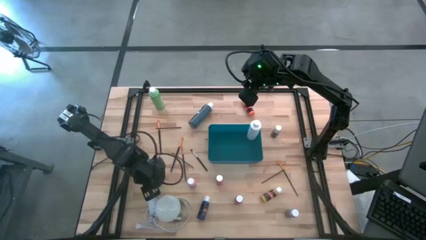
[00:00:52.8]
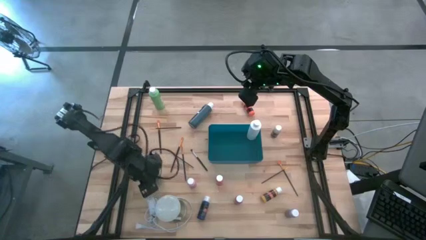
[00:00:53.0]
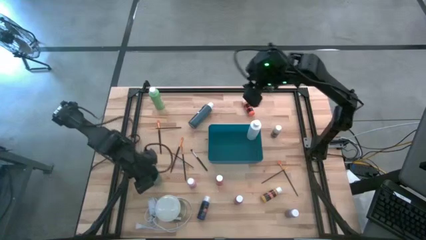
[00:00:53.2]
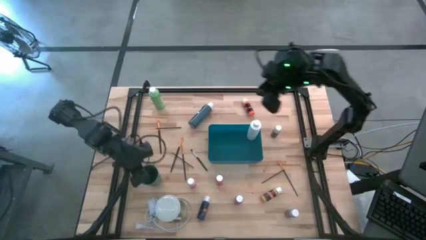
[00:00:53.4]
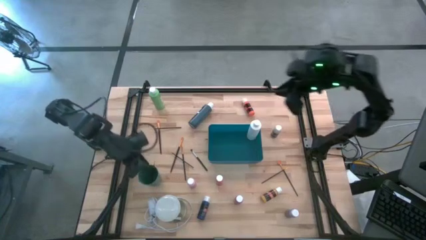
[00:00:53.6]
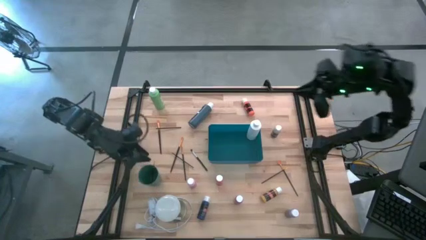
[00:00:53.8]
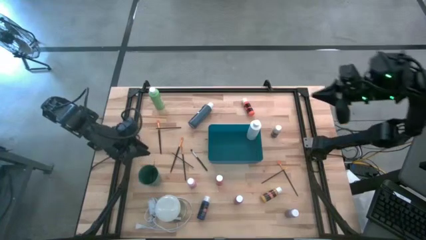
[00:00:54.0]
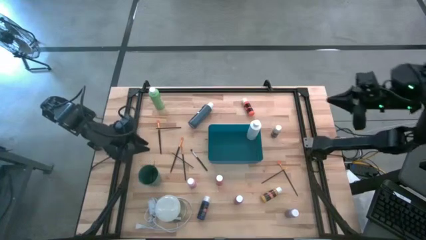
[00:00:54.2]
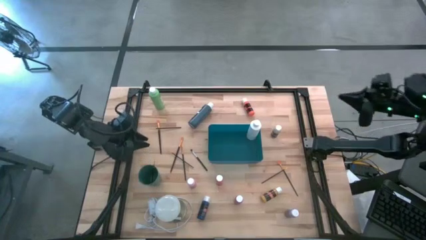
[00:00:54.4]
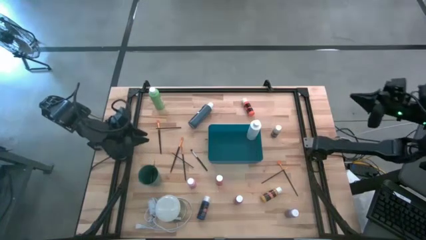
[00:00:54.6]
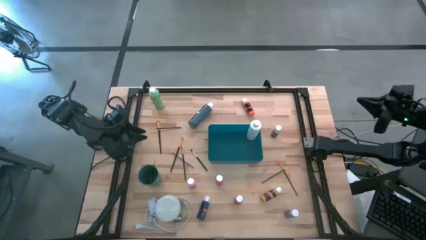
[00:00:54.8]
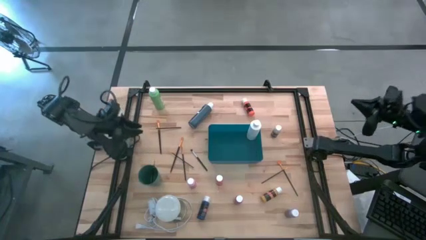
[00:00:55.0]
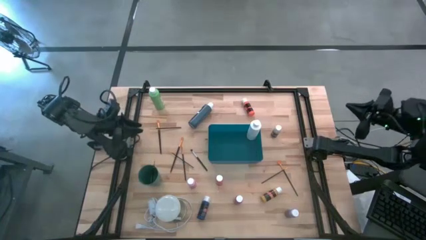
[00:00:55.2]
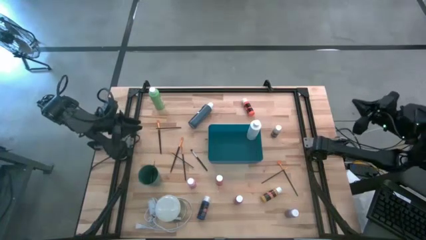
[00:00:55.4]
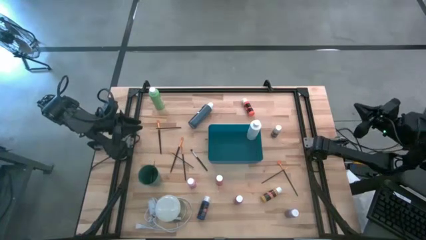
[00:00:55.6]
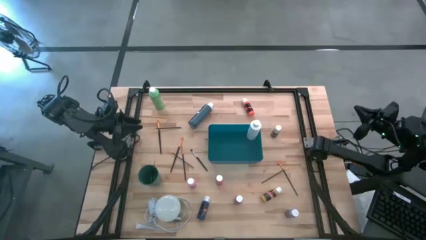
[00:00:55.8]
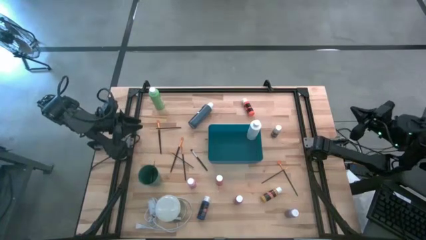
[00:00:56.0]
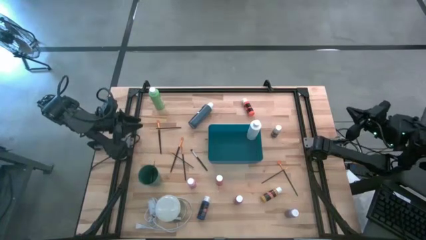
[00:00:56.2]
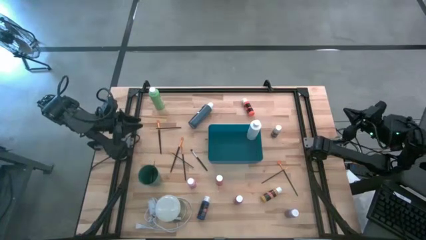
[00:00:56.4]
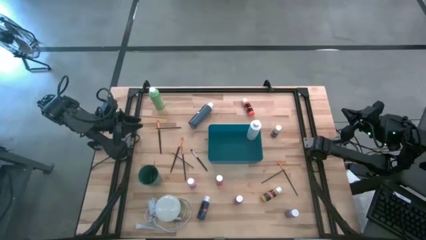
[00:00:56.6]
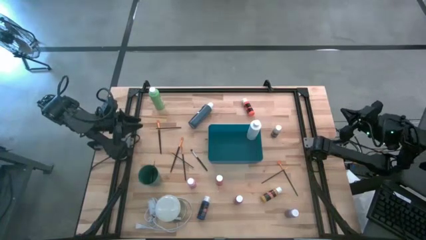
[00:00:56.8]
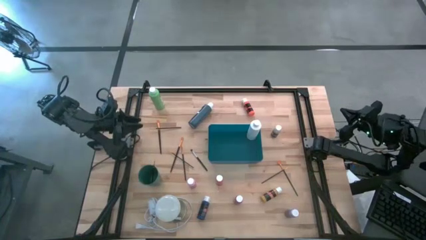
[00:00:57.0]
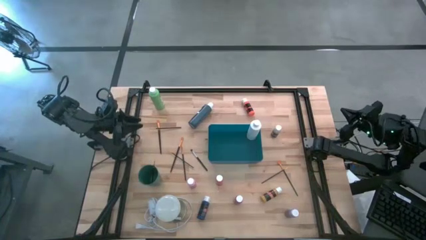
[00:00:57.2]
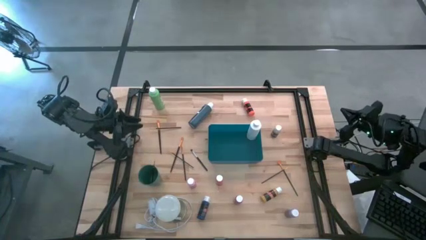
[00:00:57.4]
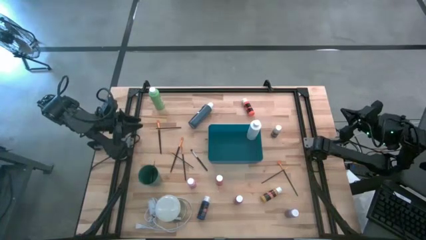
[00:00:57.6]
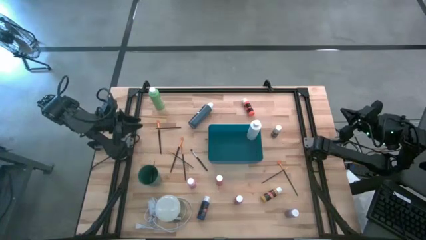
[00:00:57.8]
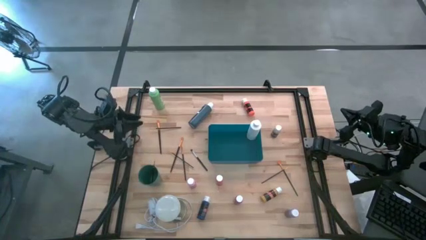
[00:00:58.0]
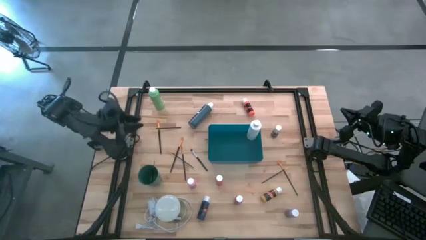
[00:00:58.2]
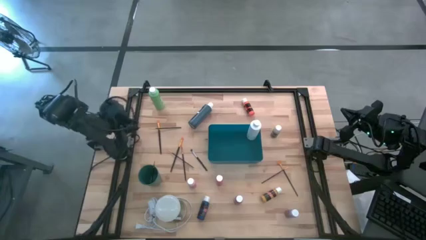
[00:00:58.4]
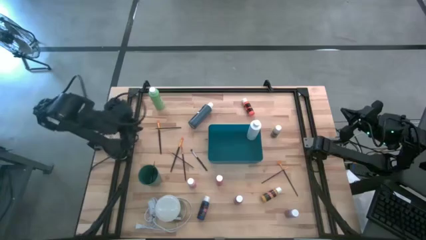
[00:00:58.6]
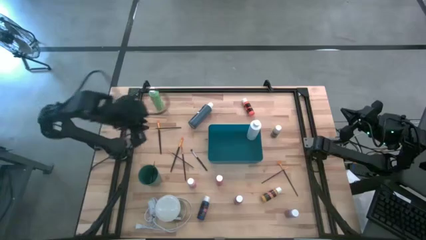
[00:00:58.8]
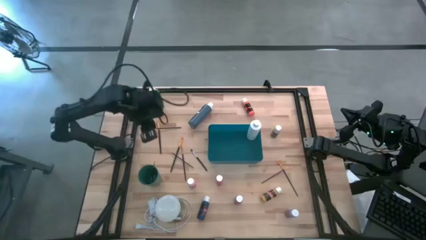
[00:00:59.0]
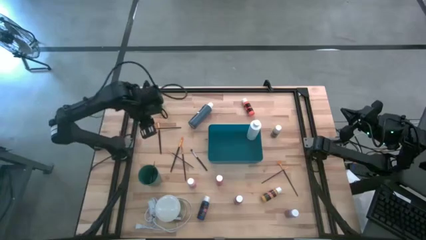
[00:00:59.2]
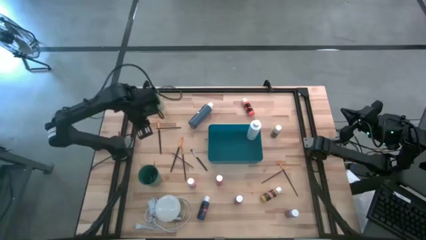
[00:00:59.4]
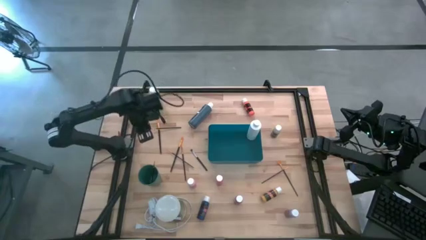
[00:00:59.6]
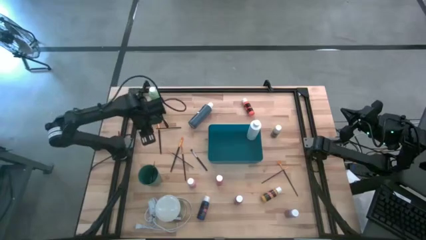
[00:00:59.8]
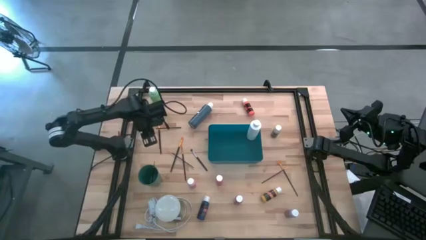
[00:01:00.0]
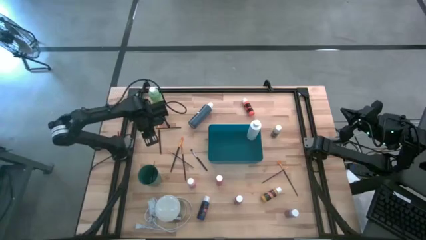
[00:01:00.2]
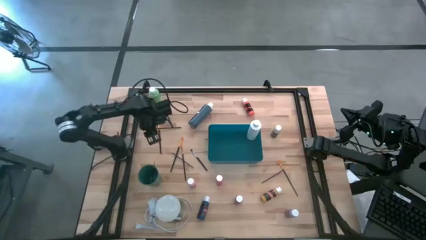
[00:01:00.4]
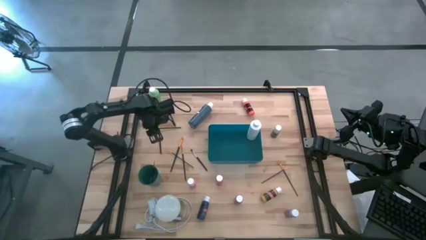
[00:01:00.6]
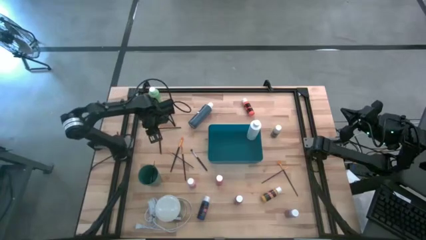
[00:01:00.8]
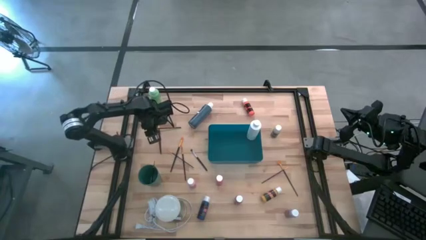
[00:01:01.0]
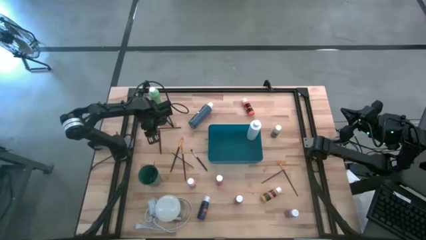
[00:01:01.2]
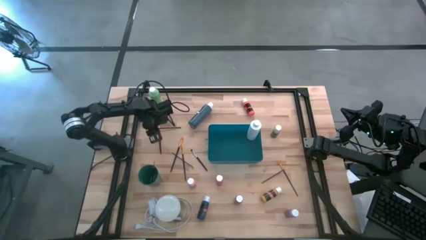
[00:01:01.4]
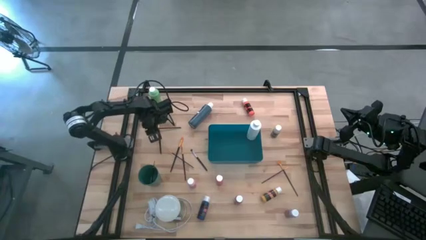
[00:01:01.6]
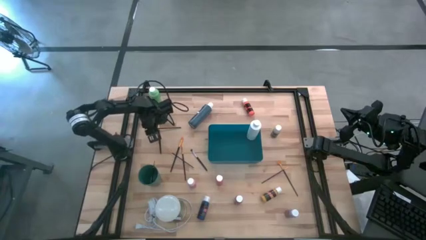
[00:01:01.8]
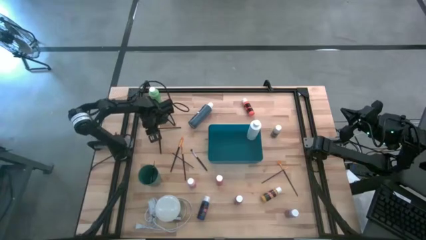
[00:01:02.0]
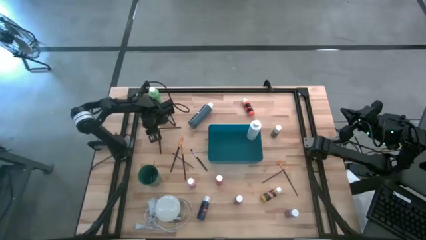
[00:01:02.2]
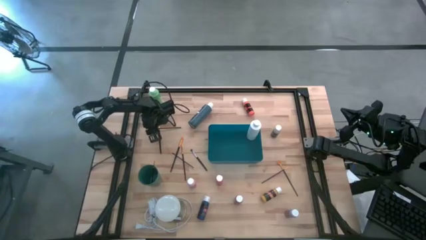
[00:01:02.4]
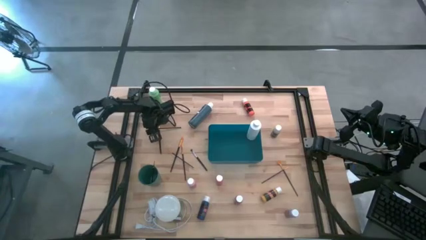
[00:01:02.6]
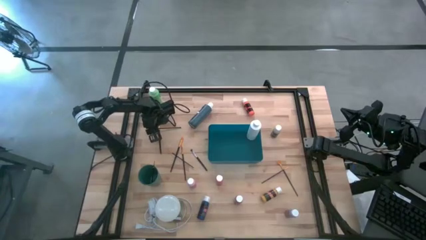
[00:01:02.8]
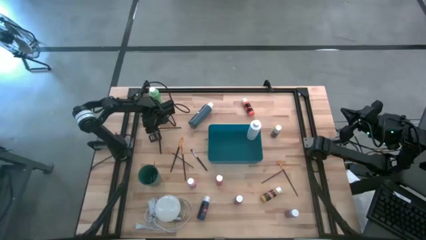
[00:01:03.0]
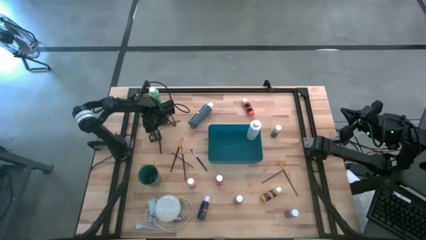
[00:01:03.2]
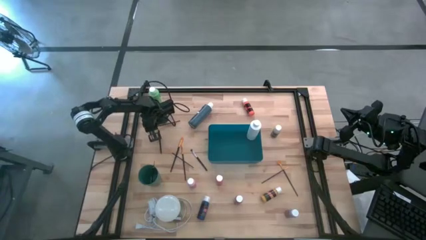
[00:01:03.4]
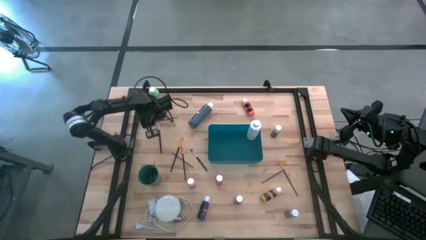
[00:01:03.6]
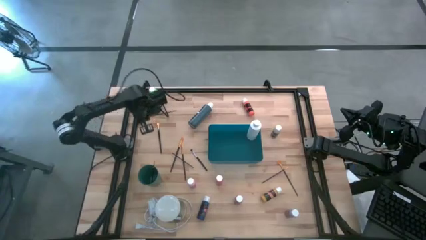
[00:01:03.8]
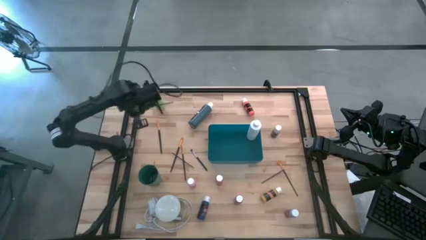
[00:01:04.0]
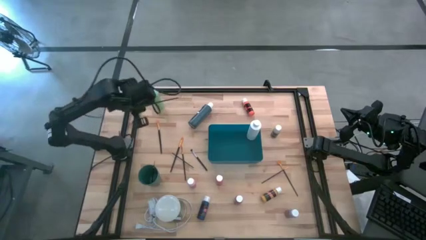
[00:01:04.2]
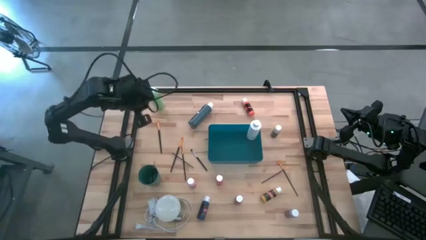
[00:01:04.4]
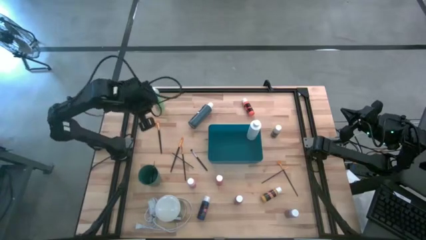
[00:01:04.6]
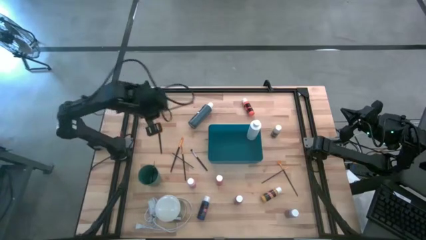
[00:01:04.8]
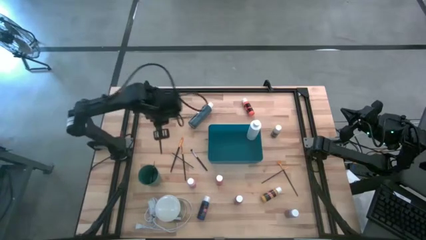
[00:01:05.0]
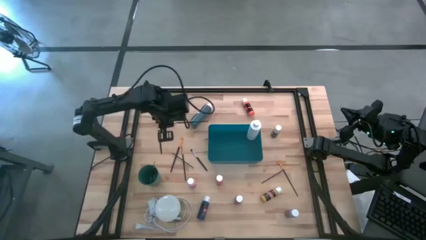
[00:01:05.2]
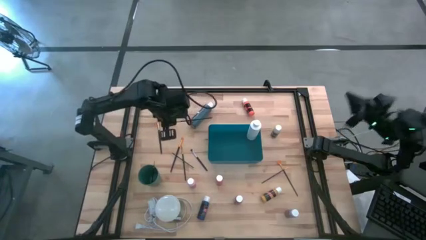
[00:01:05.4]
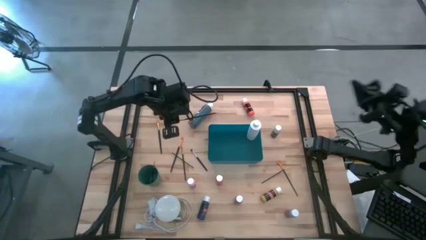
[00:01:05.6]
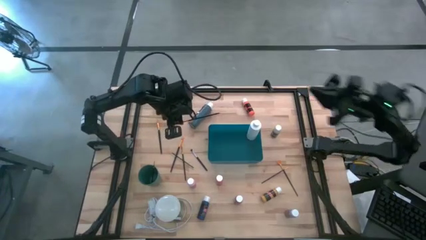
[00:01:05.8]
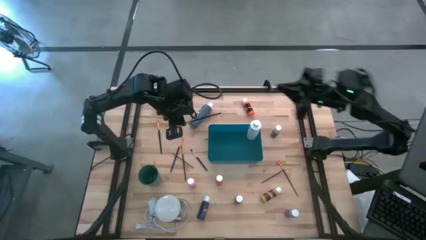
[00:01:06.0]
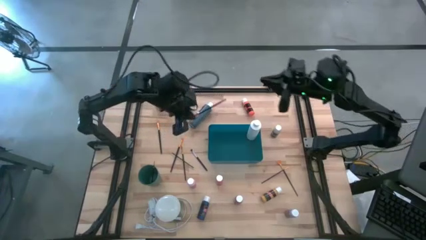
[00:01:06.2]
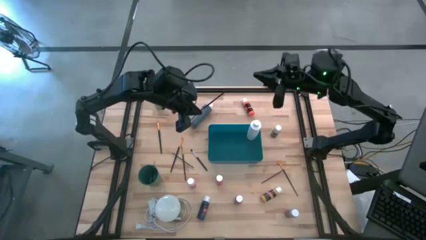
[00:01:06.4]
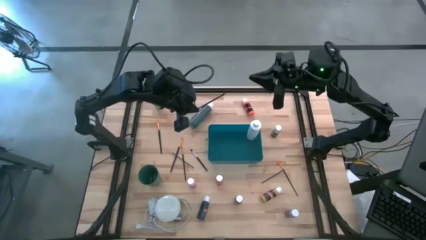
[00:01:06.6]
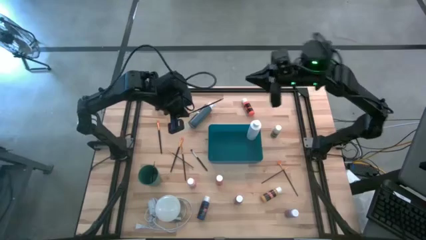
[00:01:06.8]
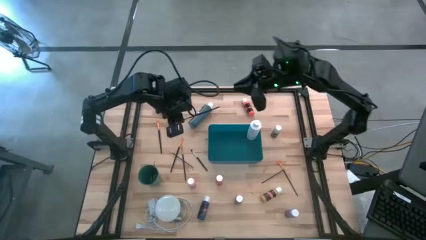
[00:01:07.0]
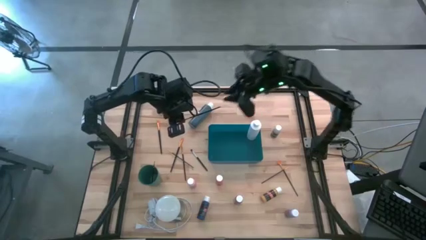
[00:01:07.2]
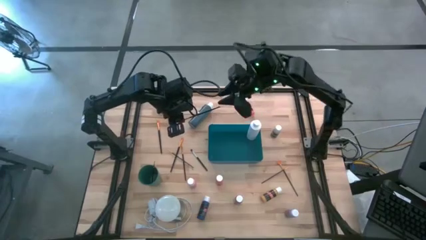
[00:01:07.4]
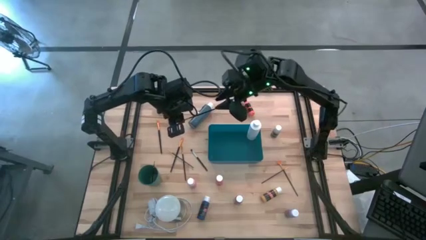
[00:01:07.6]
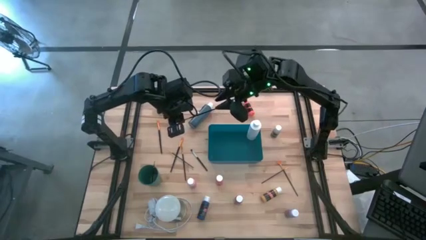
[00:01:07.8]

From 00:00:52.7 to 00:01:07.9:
Task: Pick & Place Paint Supplies
Put the gold paintbrush into the green cup
